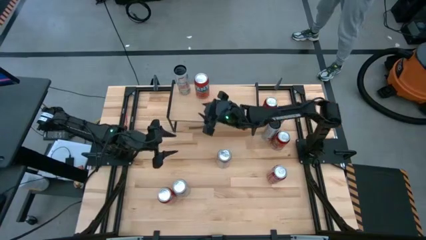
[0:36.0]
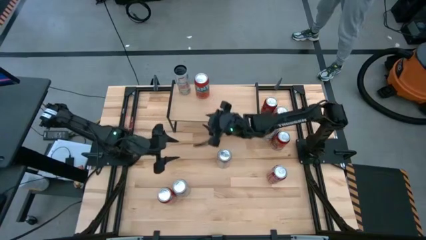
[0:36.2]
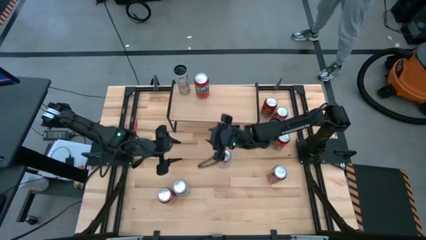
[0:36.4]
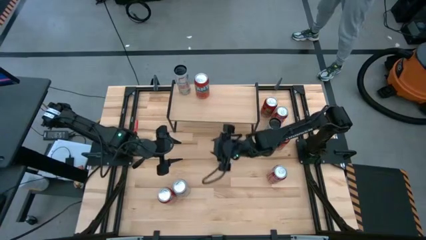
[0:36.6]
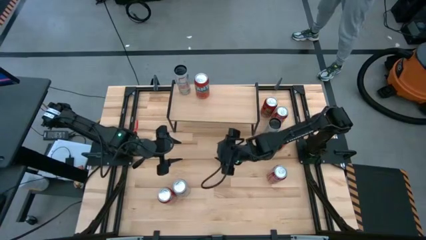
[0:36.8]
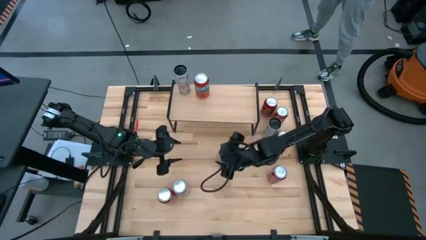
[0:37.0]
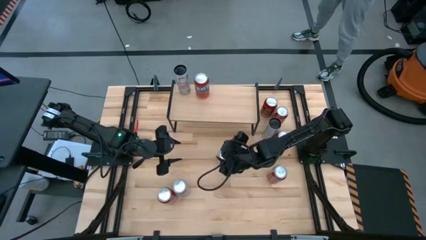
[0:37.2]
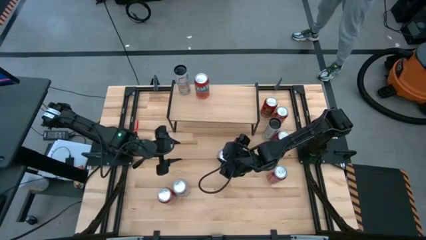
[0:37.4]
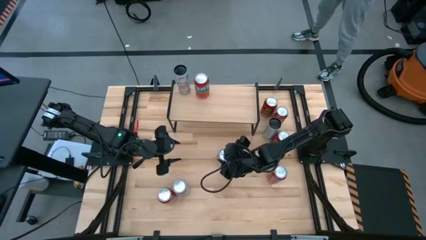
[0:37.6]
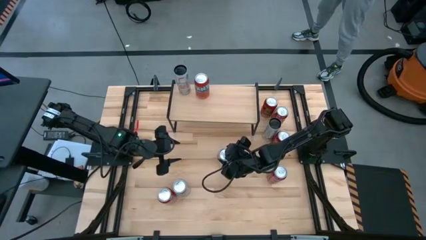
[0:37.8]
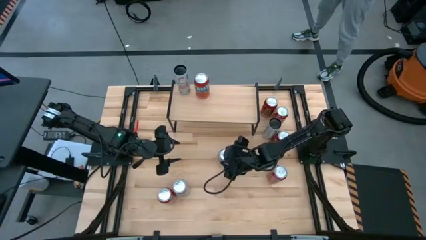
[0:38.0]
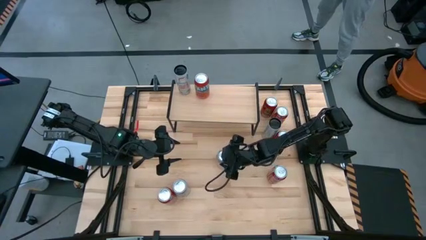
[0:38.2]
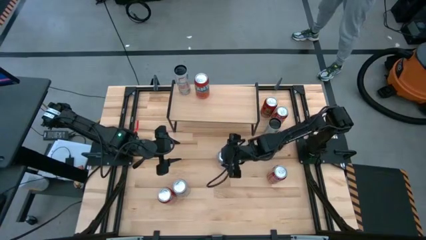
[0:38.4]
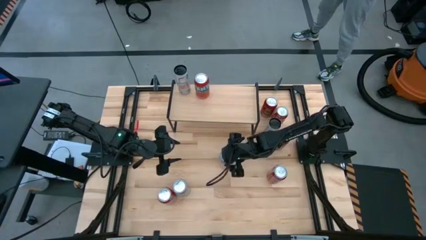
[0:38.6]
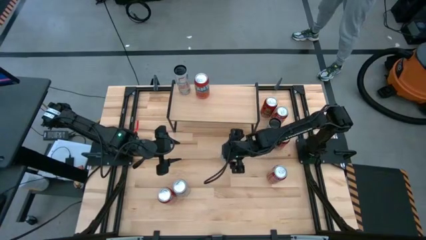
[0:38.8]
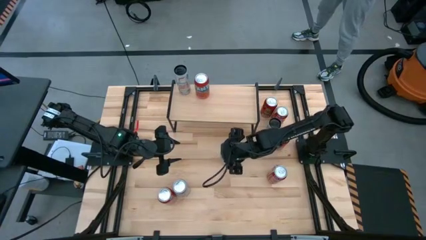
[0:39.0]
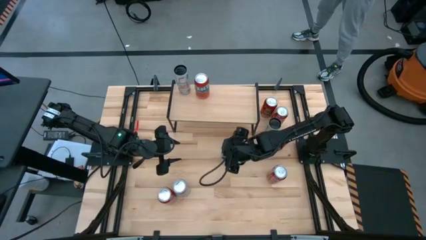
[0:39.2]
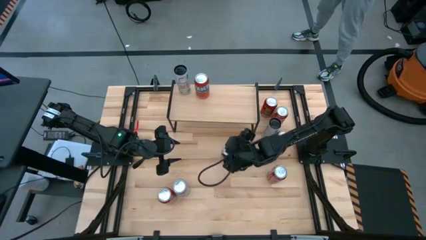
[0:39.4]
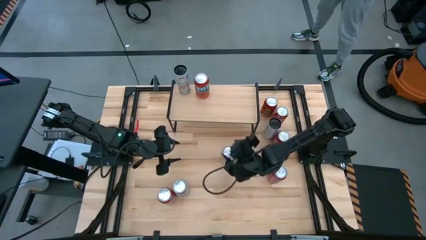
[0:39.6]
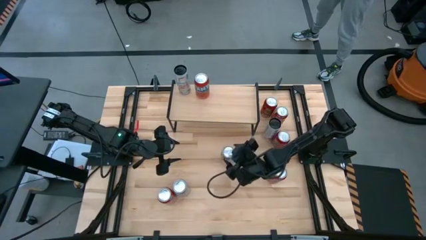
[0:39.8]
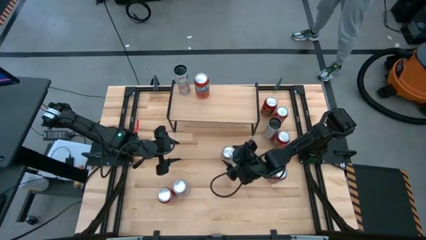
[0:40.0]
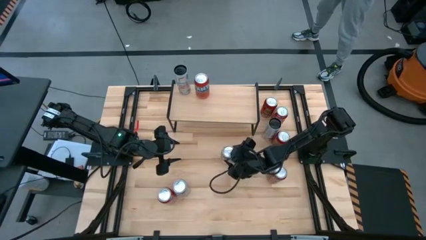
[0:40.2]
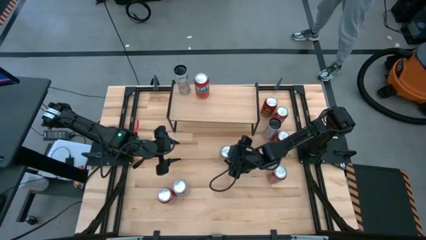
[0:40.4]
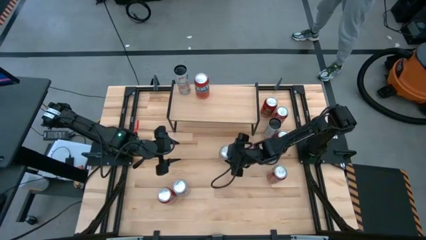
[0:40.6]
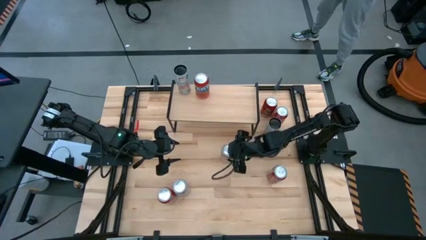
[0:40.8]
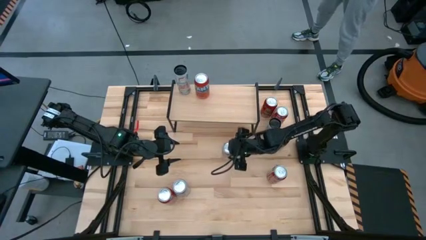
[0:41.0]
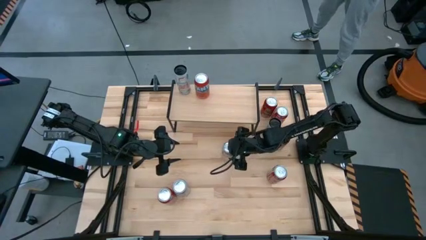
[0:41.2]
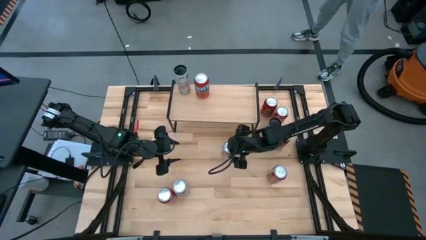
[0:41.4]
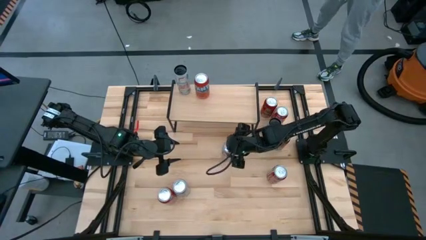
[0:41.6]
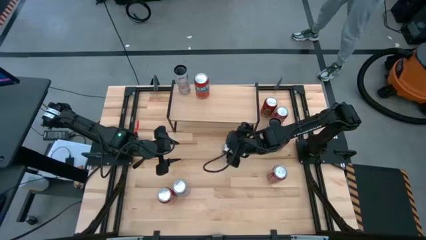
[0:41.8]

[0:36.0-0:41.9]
Task: Place canned beverage on shelf
Adjust the center silver soda can

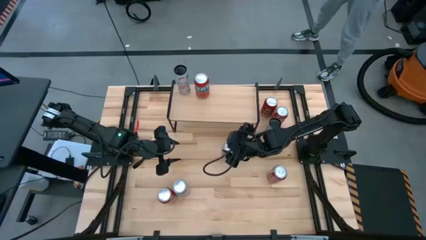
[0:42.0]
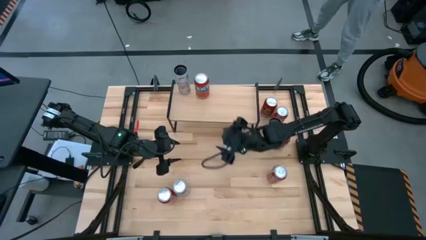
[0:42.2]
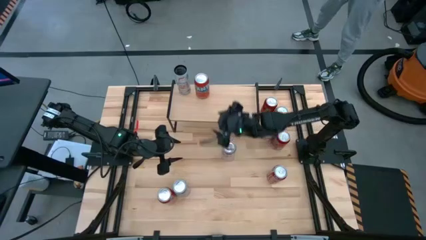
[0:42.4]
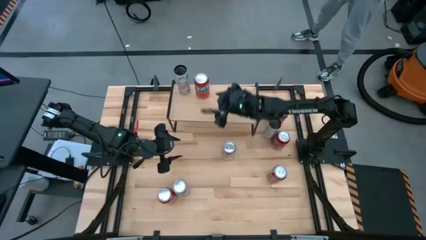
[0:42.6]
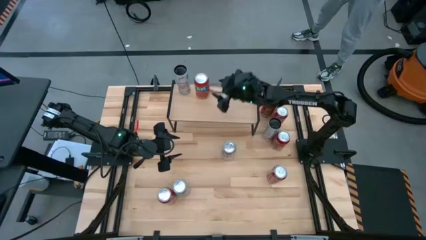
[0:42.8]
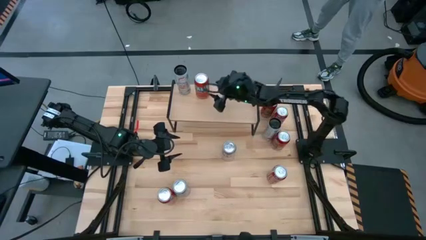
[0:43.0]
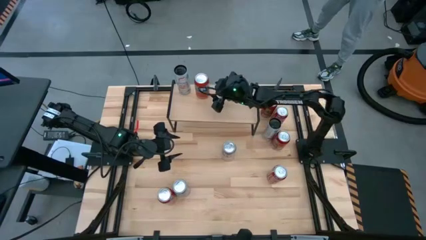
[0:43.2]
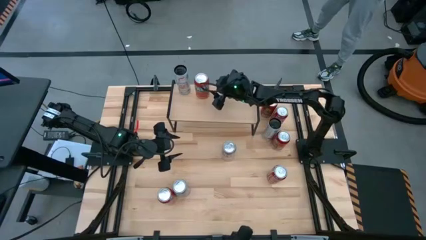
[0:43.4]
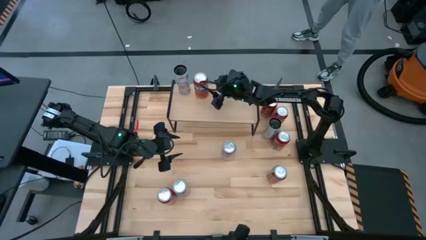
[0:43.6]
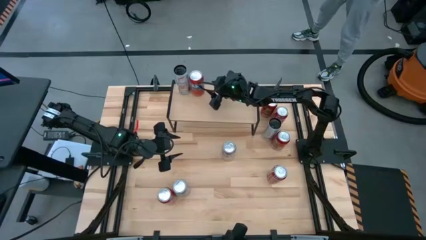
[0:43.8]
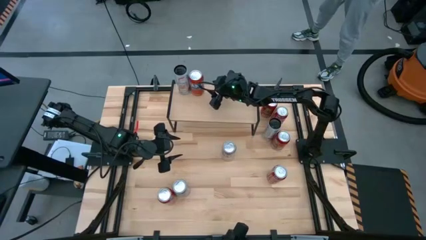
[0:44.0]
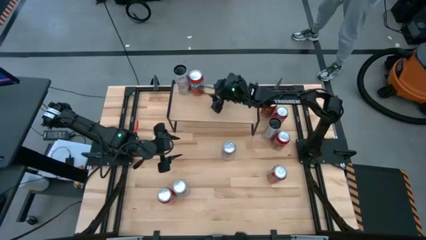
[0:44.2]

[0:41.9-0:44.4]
Adjust the orange soda can
